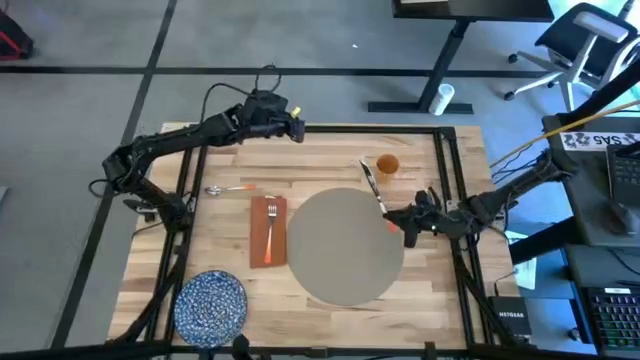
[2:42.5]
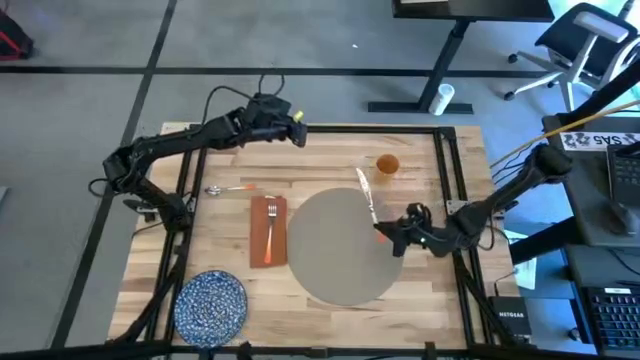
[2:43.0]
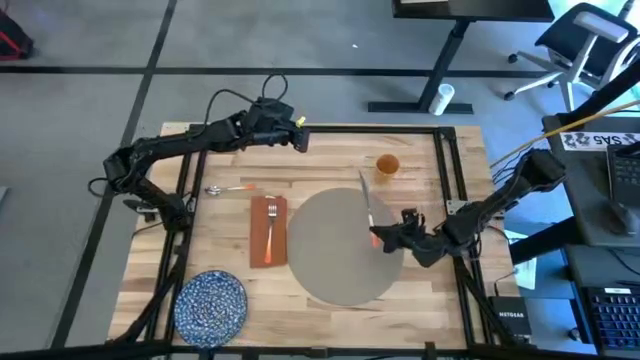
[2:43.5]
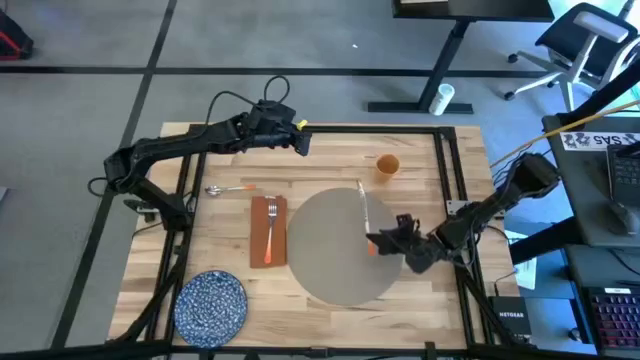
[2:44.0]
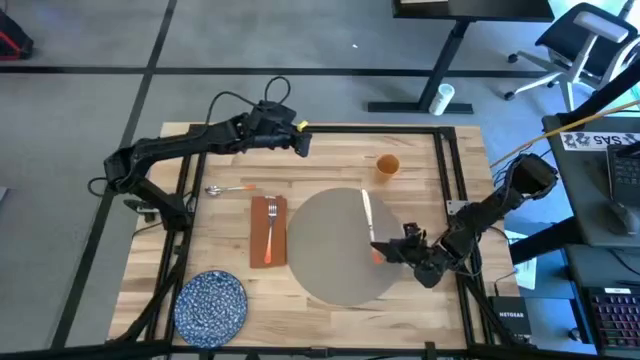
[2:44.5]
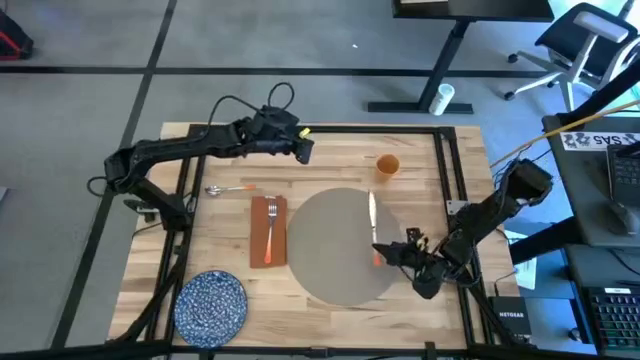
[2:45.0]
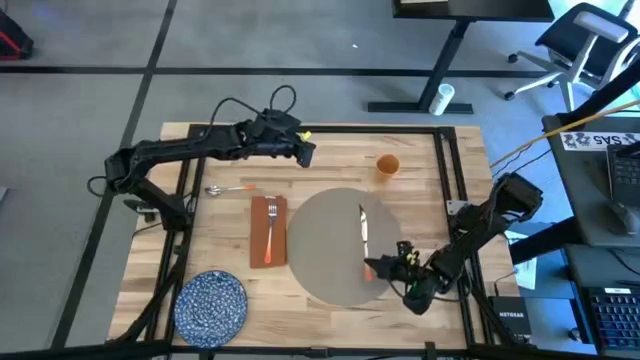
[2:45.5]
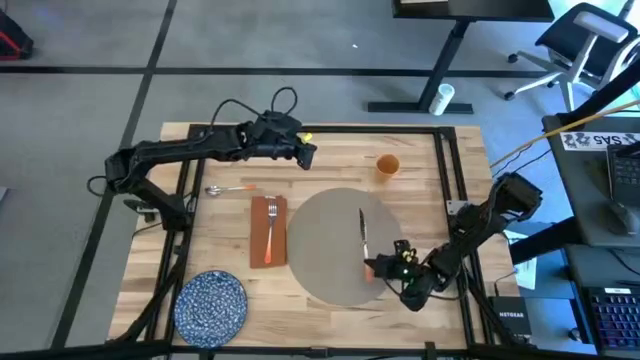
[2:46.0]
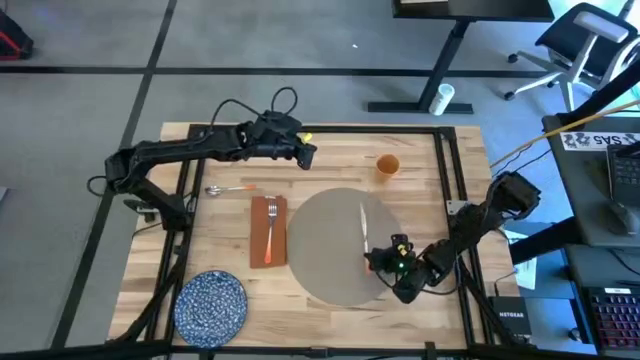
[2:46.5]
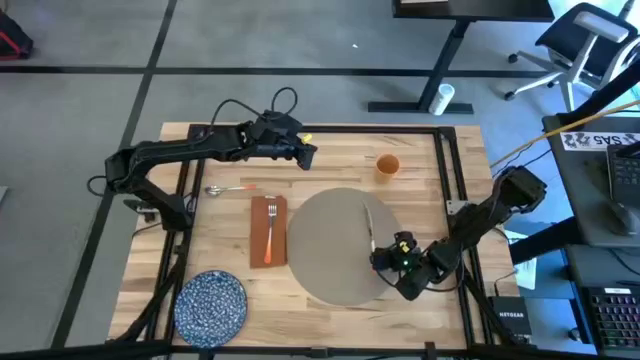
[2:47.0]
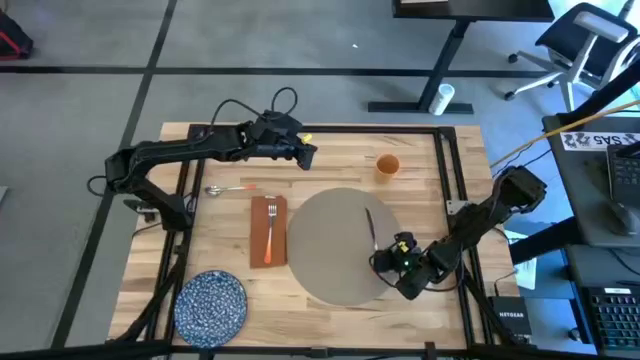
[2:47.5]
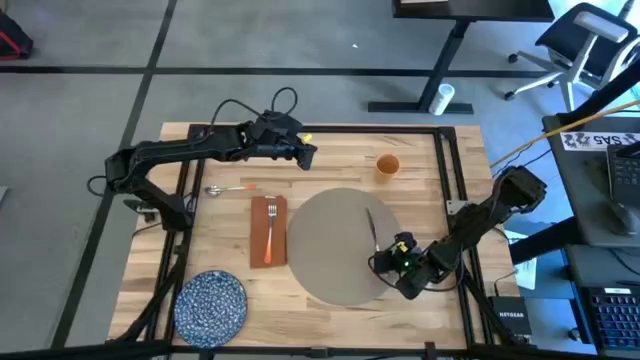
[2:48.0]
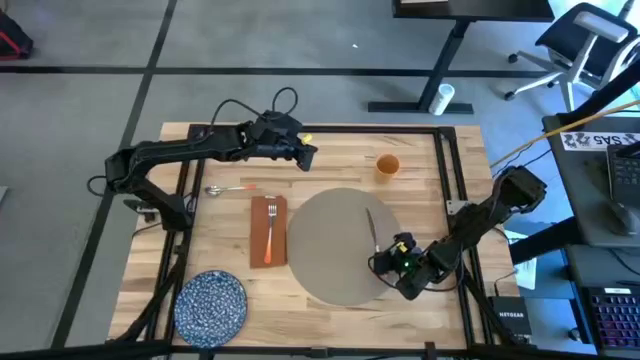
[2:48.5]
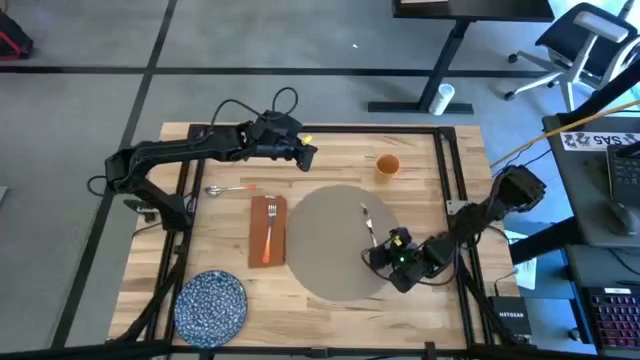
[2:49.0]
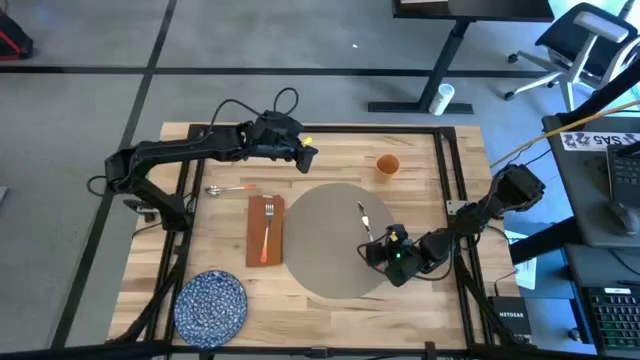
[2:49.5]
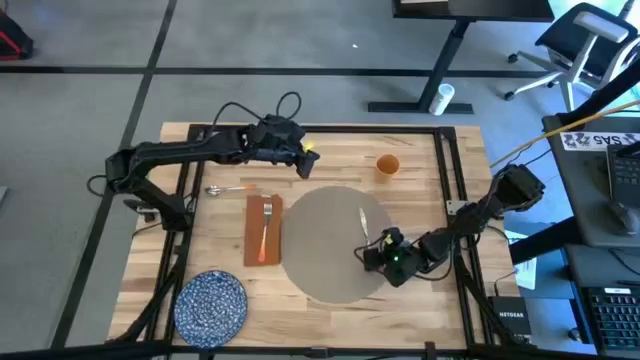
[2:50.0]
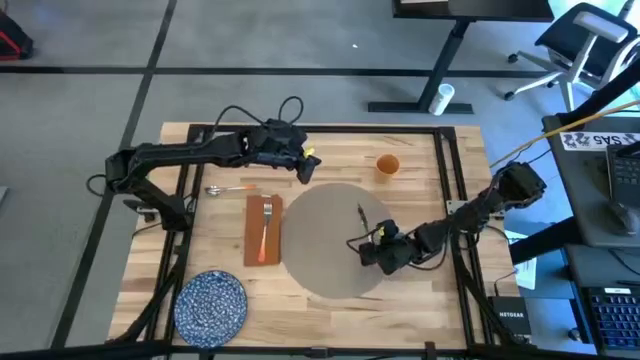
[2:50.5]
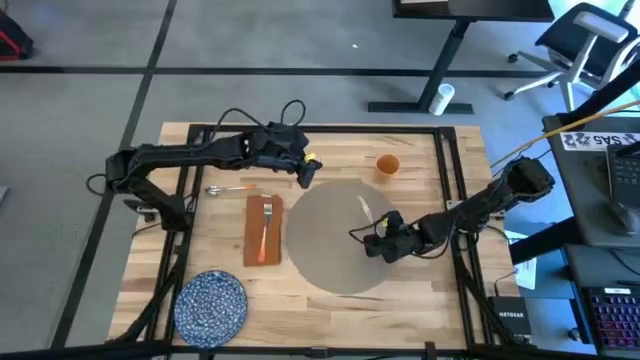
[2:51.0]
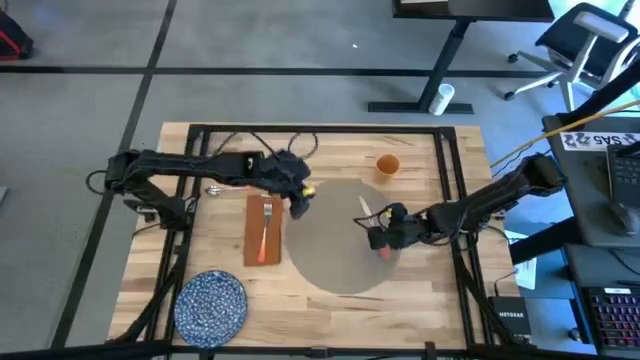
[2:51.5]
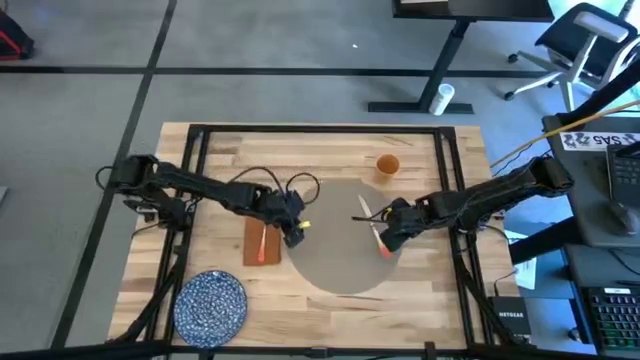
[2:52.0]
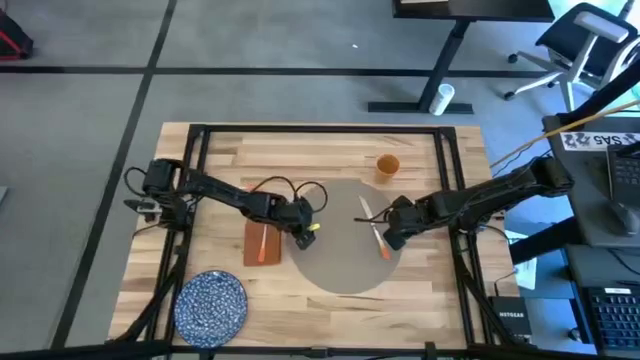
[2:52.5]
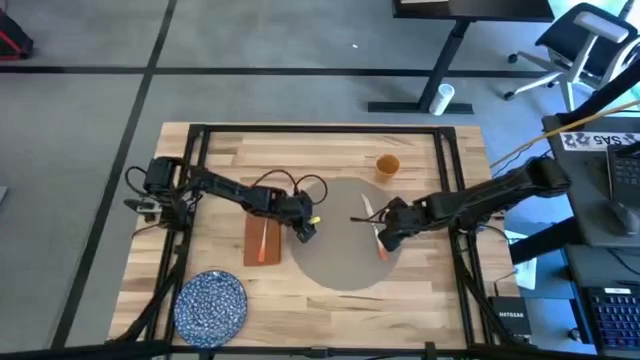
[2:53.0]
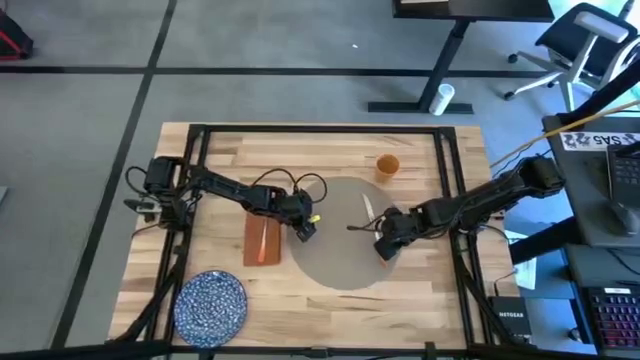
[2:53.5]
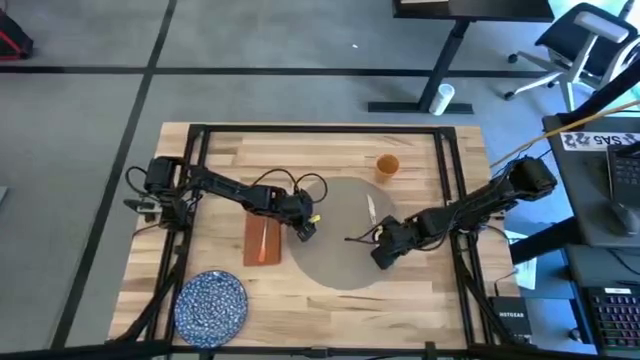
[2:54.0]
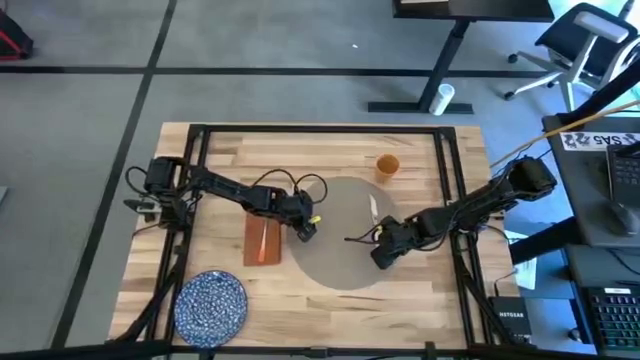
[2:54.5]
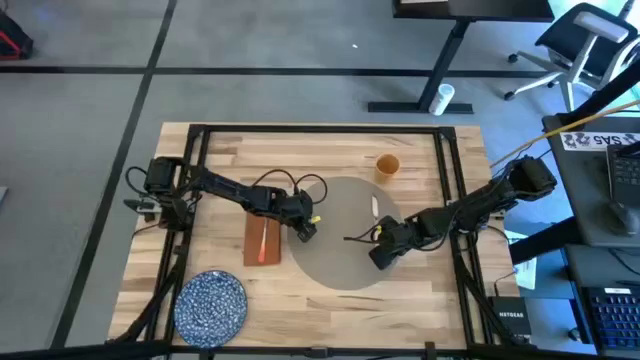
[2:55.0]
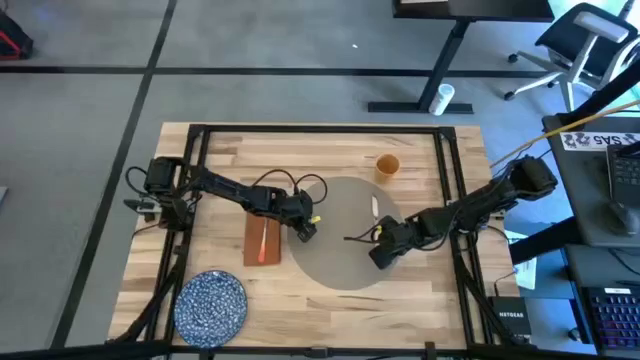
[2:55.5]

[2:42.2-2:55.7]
Task: Set table place
Put the orange knife on the gray mat

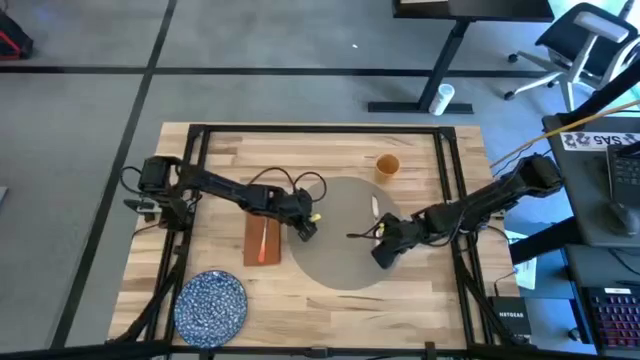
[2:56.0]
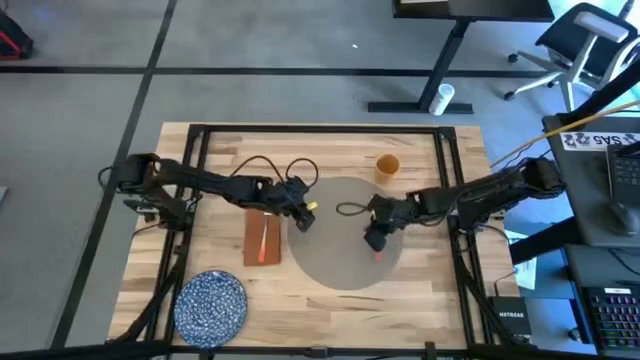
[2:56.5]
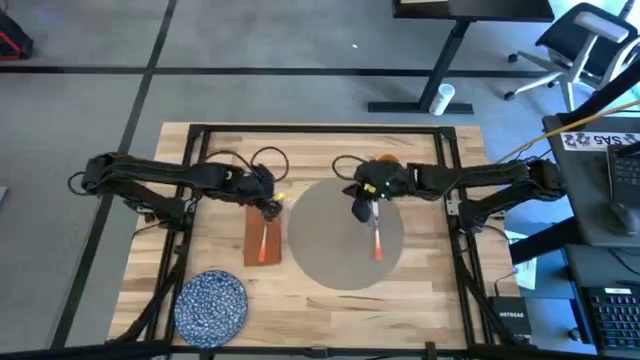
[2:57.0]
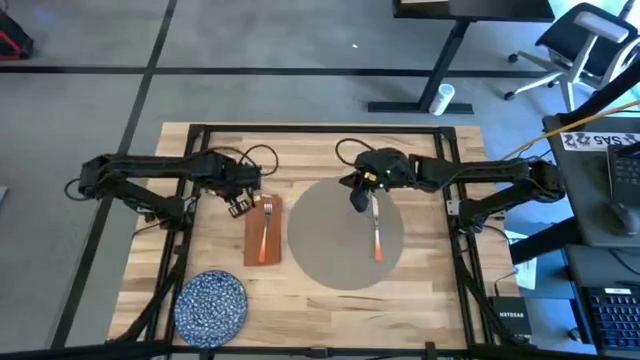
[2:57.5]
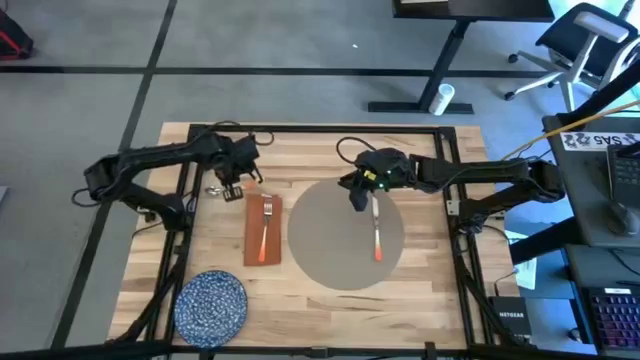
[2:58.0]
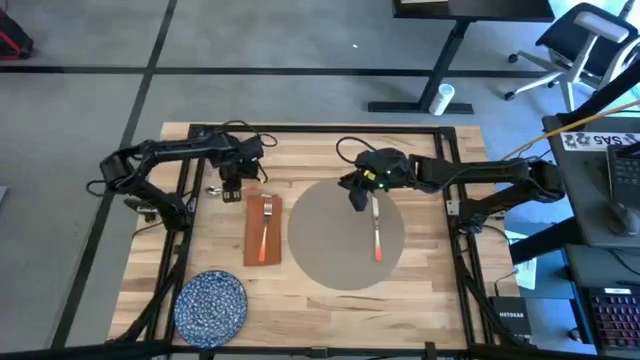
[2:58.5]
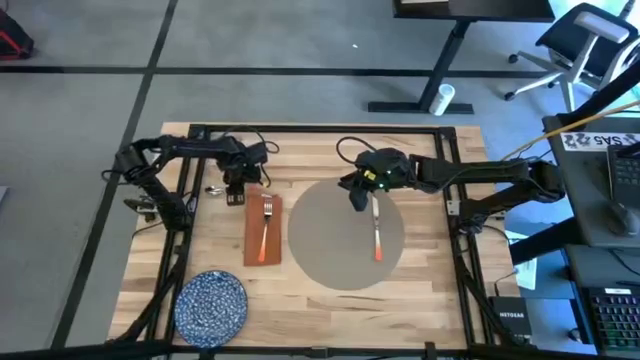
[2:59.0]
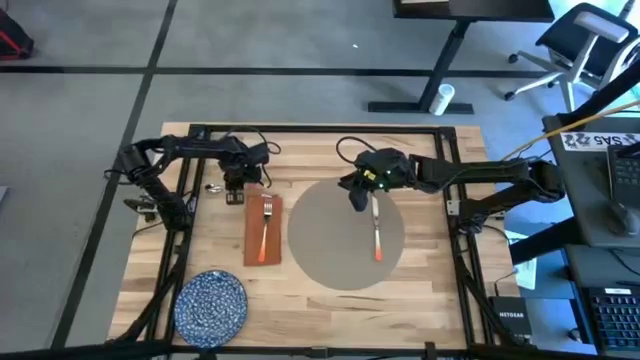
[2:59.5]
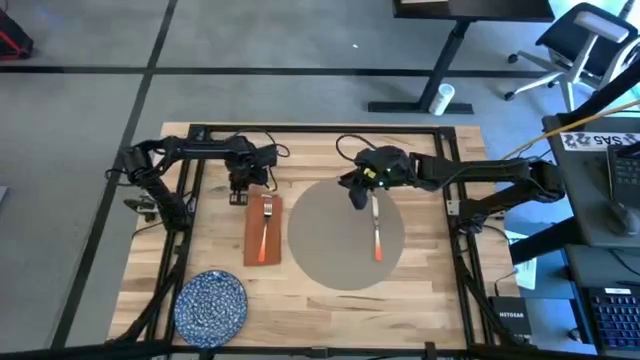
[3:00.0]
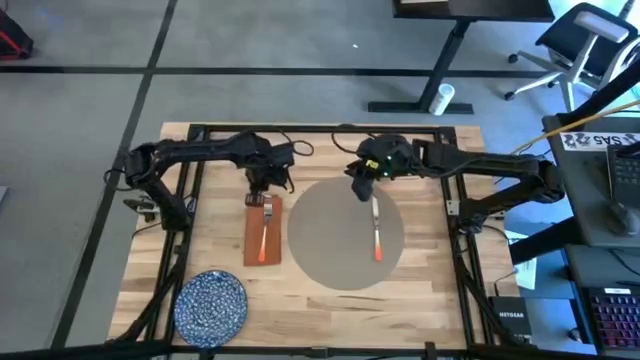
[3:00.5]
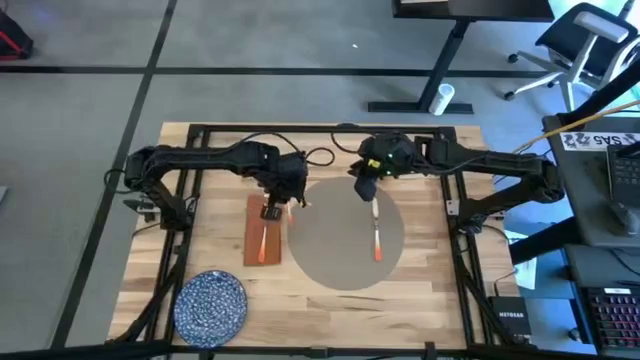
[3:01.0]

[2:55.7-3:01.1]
Put the orange spoon on the gray mat

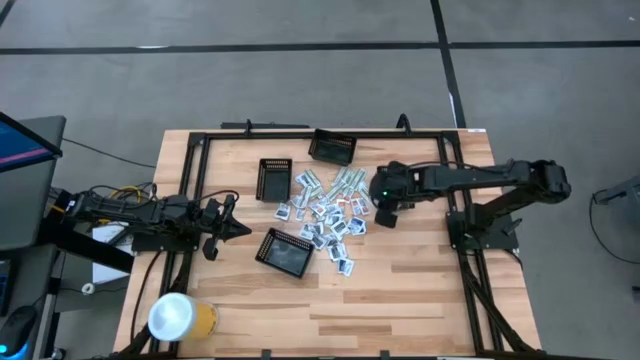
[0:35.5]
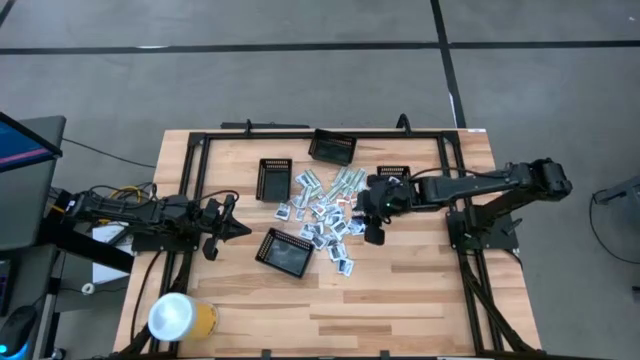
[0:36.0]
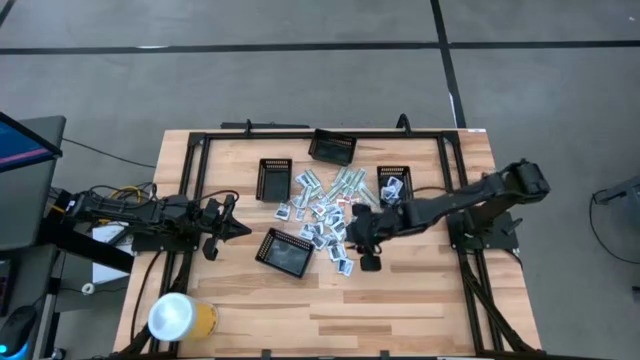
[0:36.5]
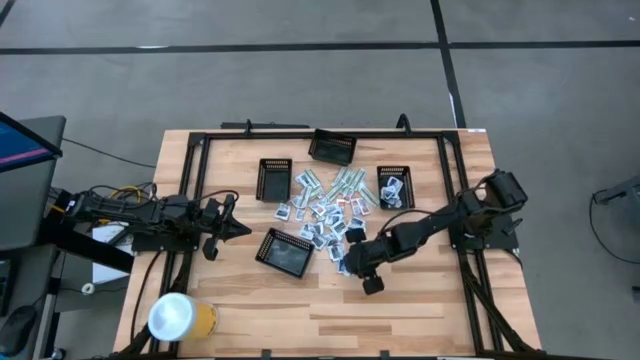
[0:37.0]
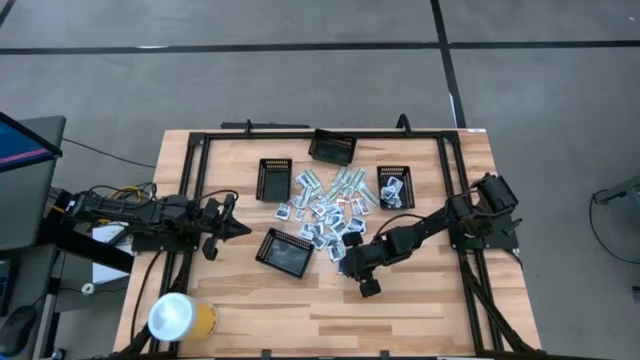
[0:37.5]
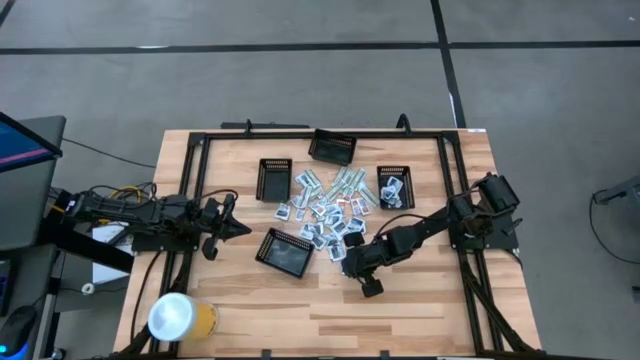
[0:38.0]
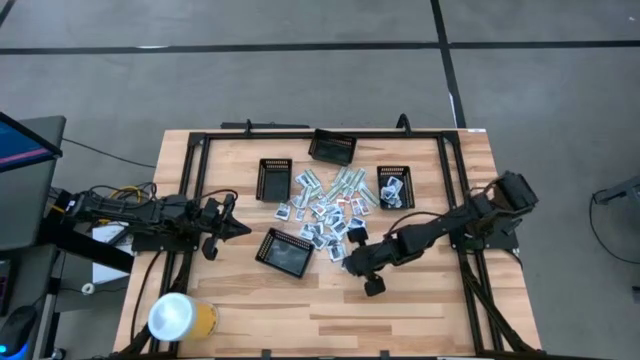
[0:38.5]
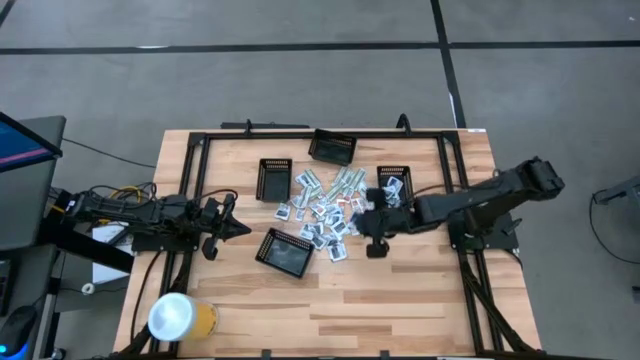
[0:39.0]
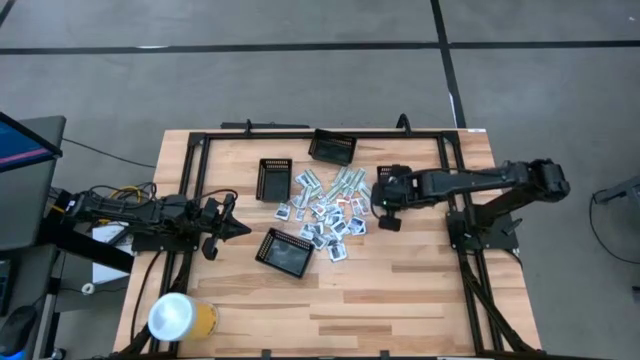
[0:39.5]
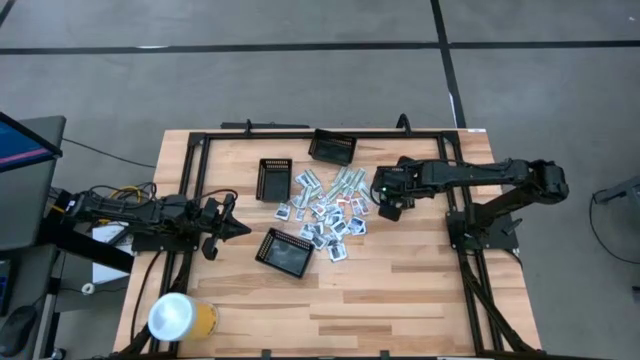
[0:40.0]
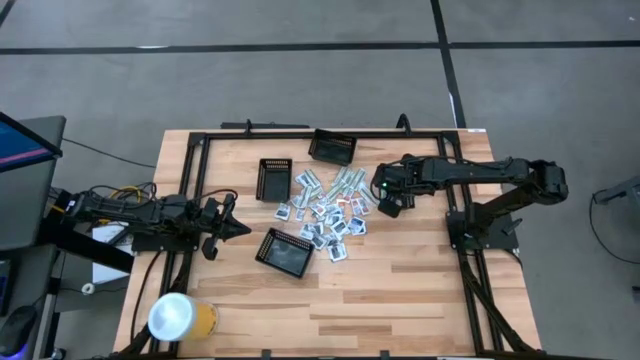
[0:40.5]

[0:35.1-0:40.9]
Task: Pick & Place First Aid Supplies
Put the white alcohol pad into the right black bin
